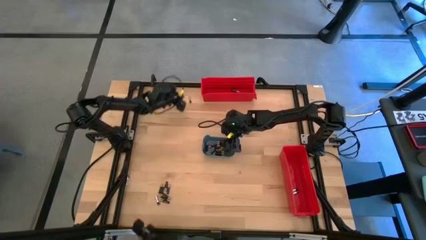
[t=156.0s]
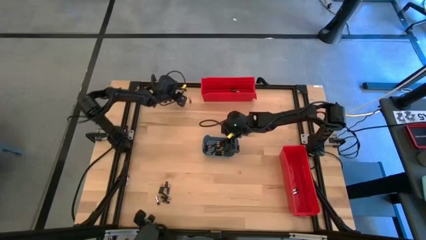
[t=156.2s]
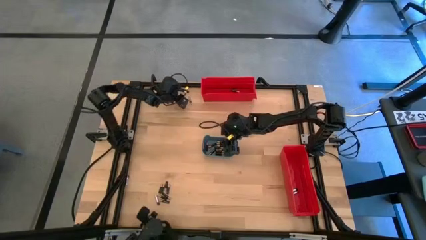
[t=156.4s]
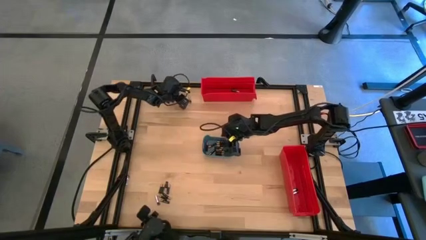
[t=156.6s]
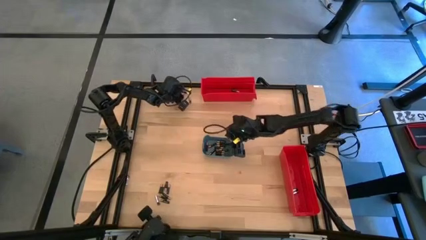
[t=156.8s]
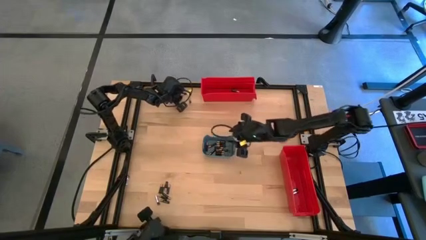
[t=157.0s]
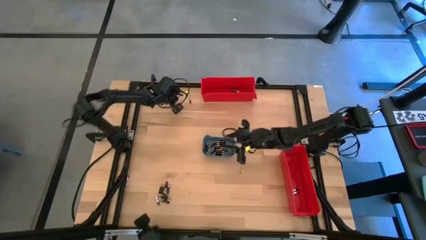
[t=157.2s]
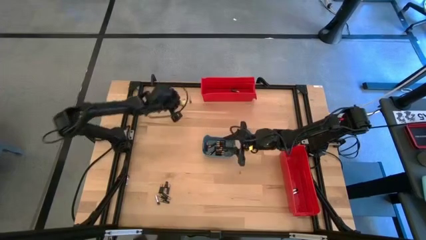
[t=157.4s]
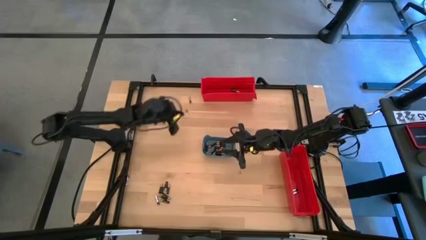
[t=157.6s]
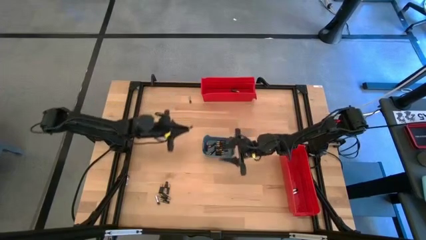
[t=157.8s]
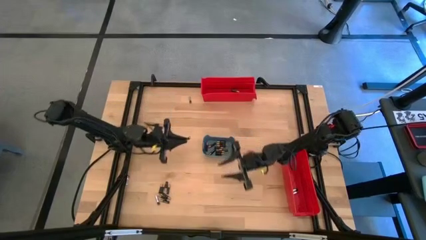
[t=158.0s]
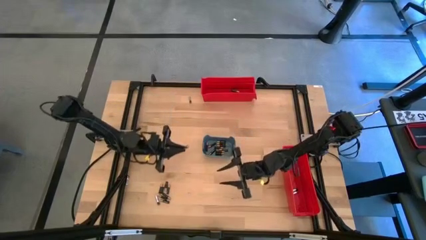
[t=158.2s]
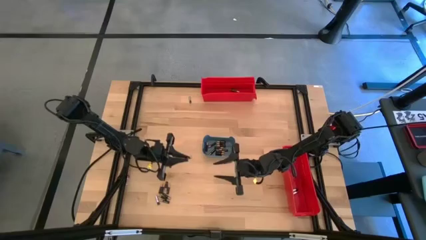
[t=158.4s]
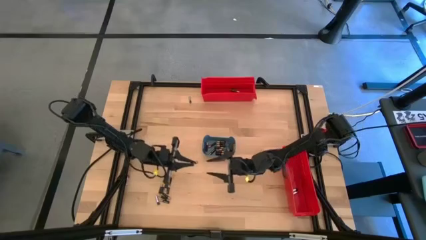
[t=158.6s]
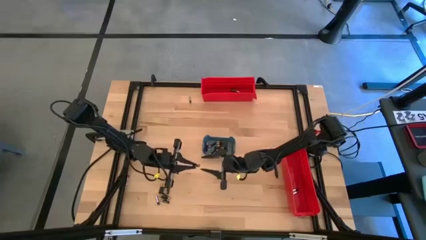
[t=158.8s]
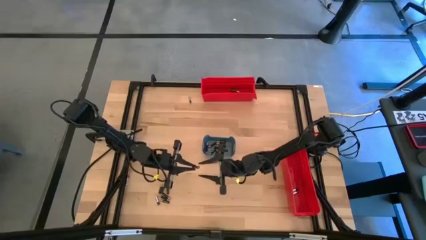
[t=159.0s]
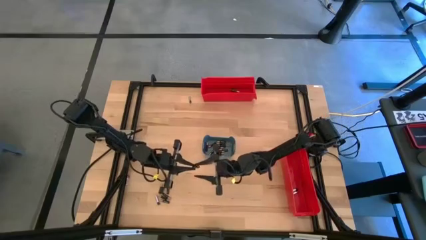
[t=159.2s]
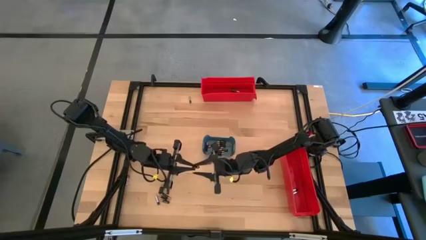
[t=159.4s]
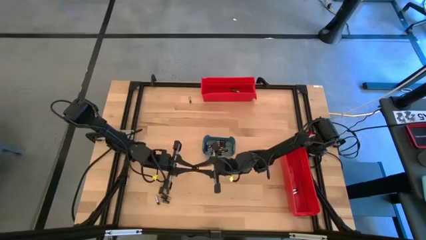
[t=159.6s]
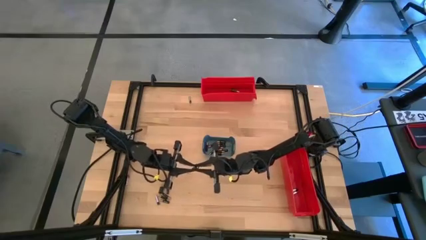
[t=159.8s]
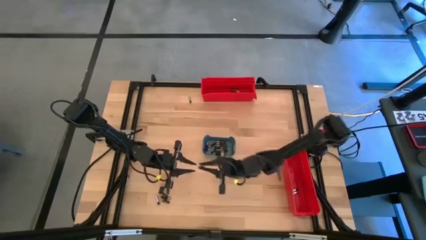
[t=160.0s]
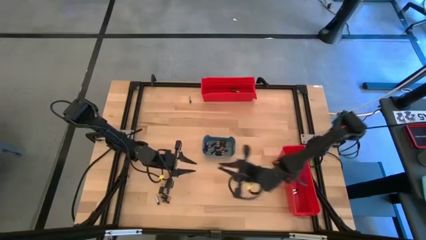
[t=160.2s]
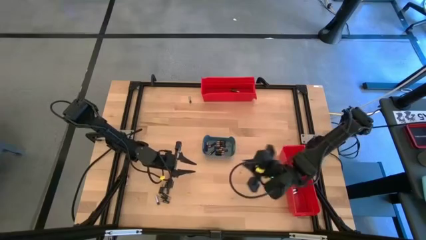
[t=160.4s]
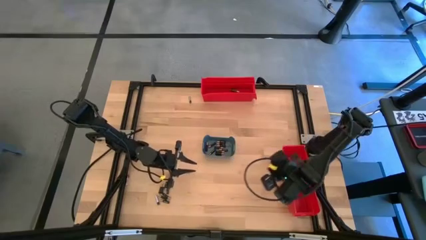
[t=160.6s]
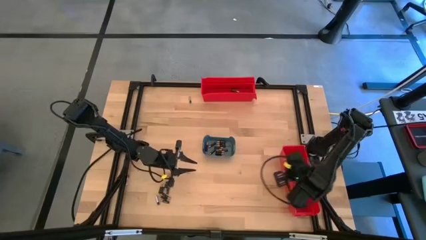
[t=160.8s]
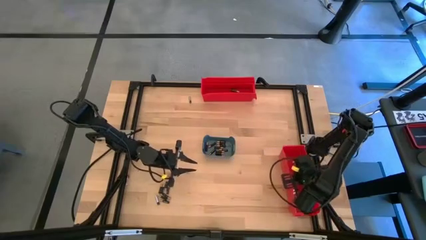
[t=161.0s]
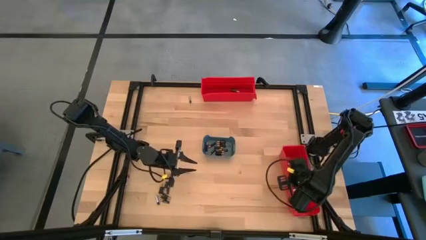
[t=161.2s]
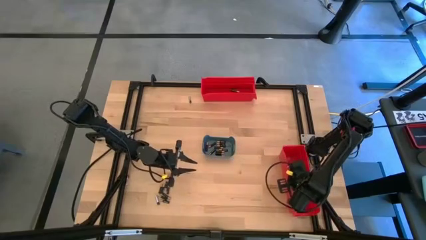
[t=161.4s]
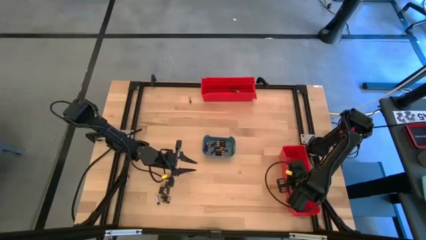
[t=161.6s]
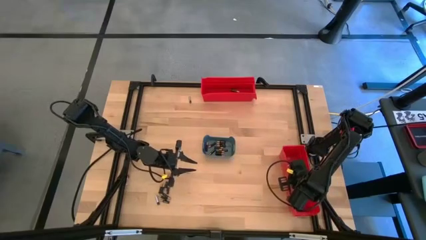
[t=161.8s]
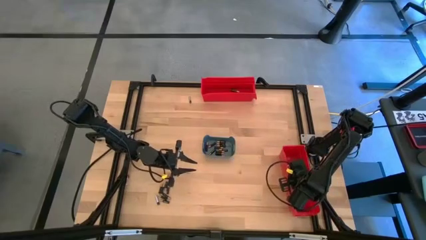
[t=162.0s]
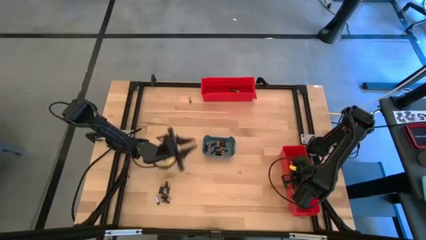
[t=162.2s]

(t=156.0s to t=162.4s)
Task: Sort batteries
Put the silver battery into the bottom red bin

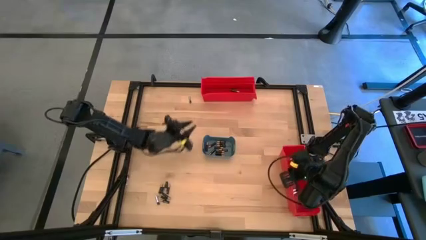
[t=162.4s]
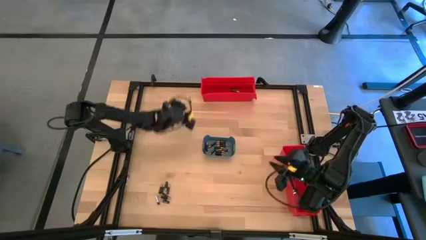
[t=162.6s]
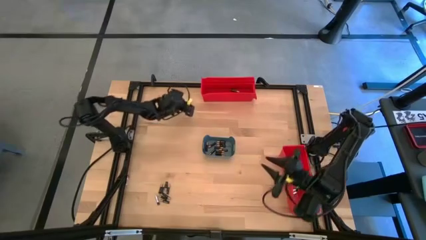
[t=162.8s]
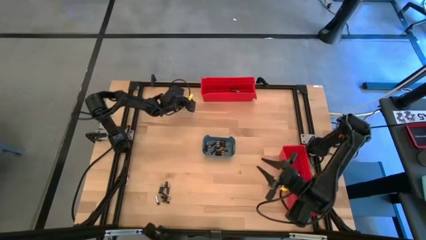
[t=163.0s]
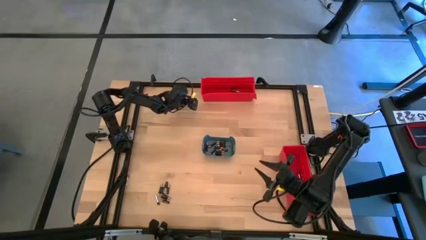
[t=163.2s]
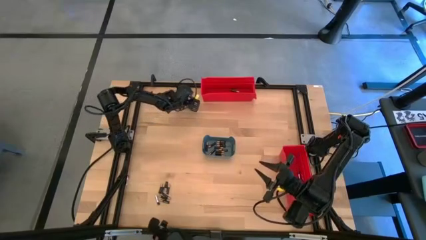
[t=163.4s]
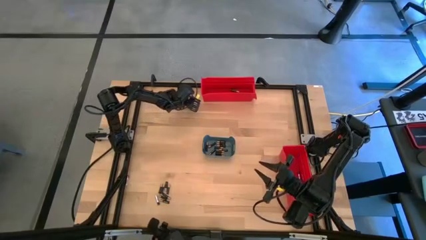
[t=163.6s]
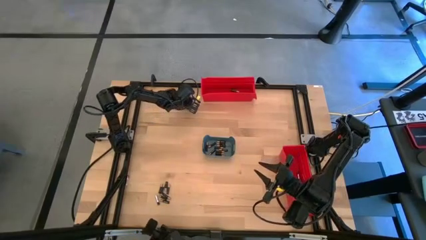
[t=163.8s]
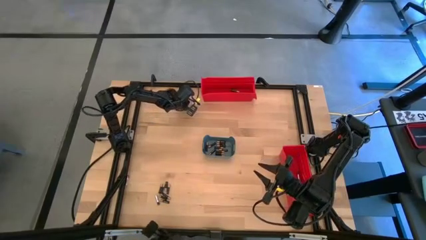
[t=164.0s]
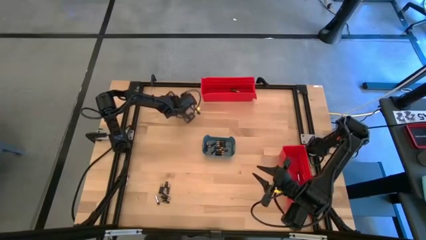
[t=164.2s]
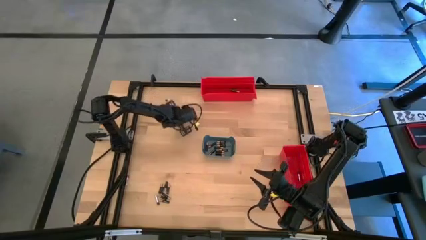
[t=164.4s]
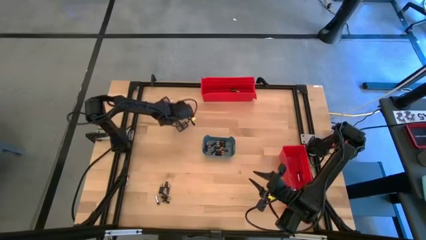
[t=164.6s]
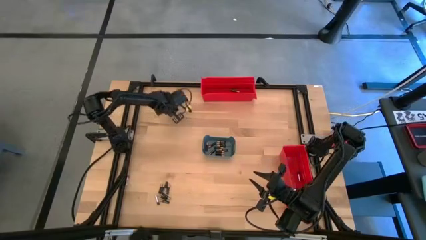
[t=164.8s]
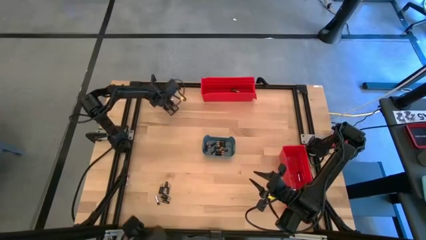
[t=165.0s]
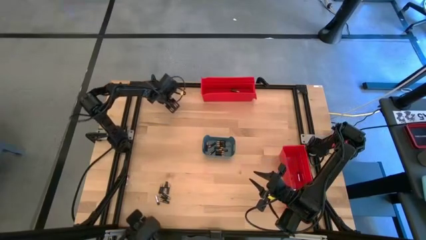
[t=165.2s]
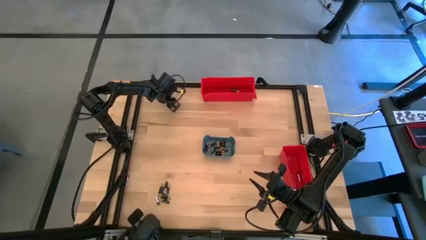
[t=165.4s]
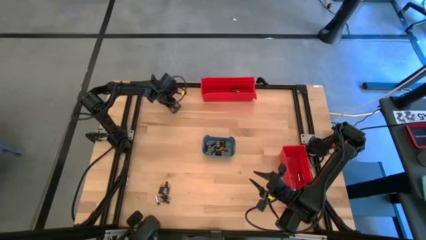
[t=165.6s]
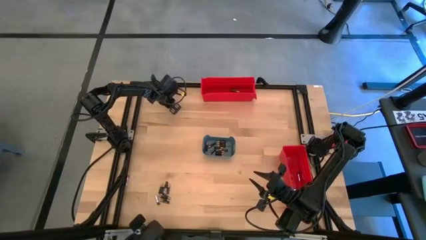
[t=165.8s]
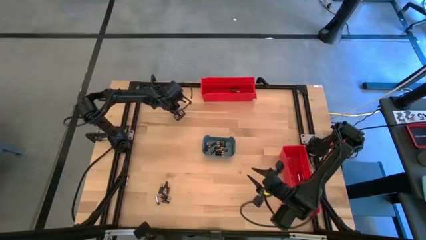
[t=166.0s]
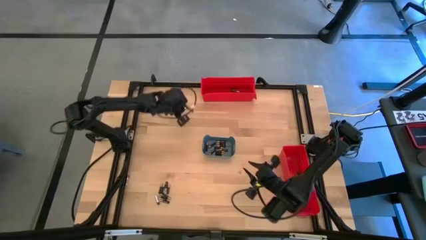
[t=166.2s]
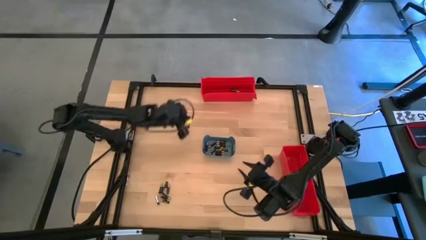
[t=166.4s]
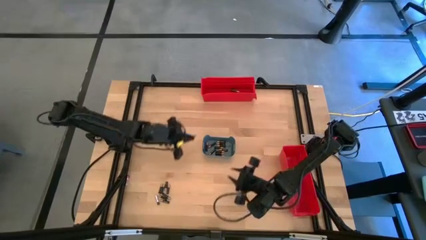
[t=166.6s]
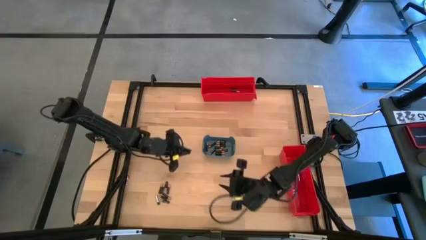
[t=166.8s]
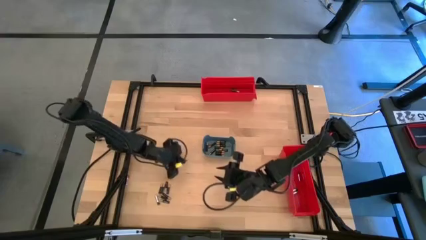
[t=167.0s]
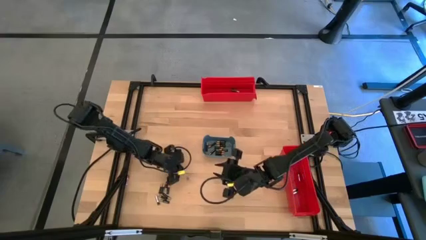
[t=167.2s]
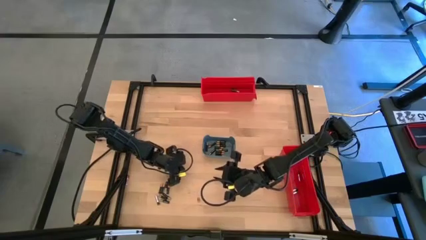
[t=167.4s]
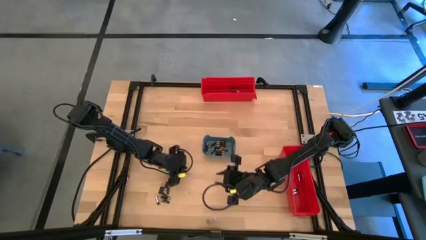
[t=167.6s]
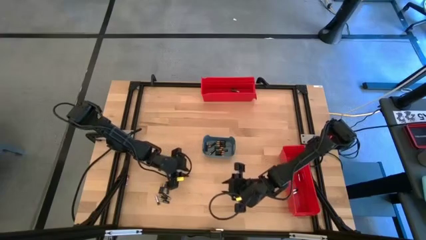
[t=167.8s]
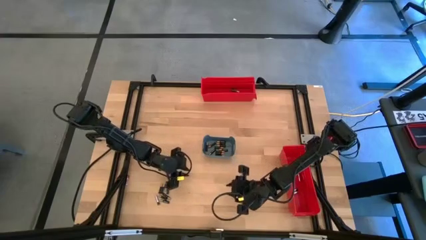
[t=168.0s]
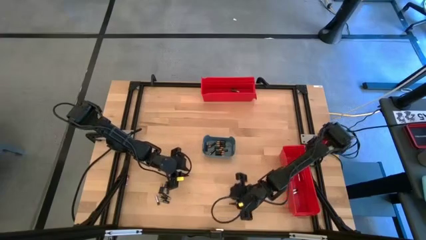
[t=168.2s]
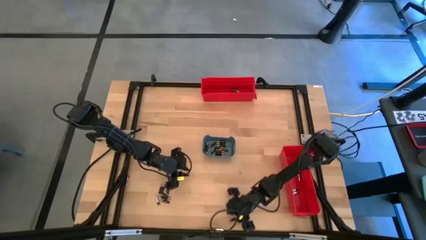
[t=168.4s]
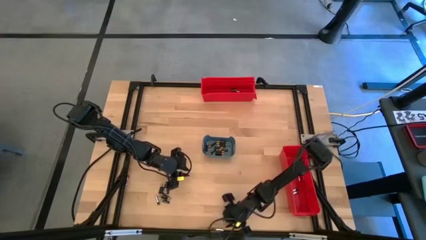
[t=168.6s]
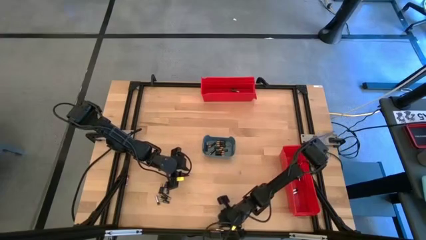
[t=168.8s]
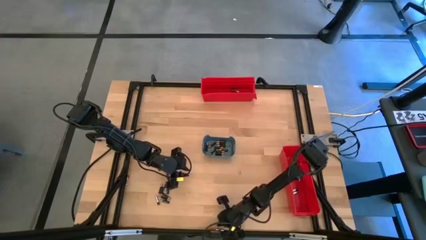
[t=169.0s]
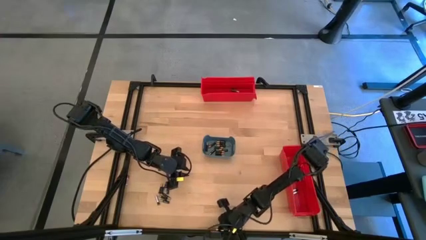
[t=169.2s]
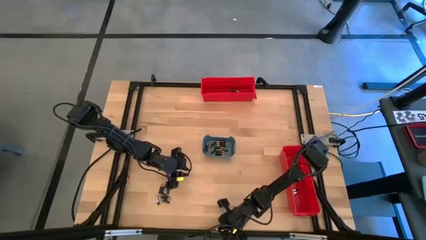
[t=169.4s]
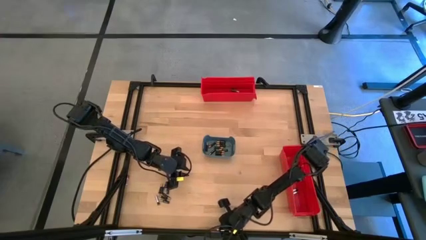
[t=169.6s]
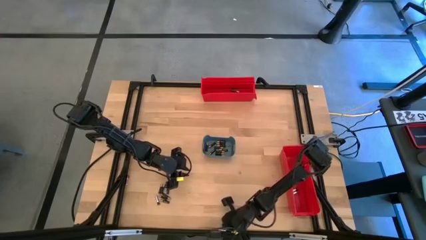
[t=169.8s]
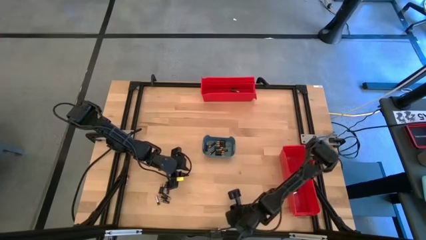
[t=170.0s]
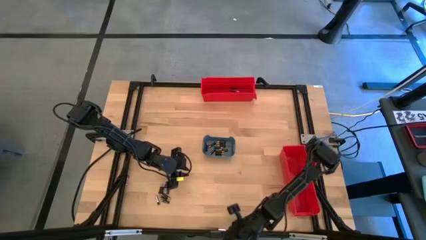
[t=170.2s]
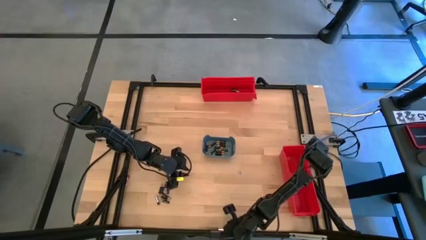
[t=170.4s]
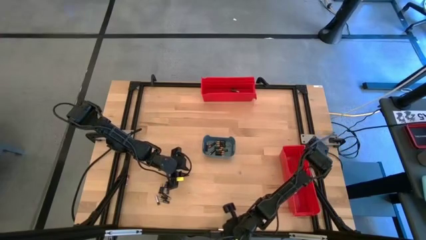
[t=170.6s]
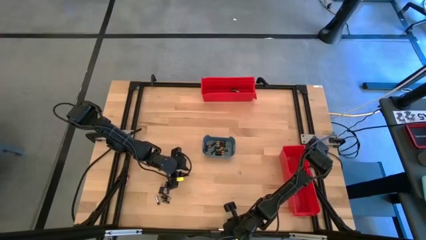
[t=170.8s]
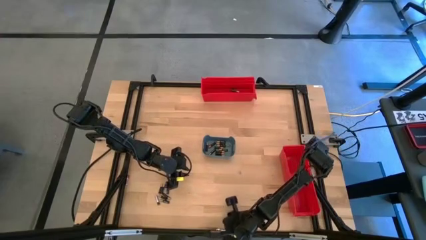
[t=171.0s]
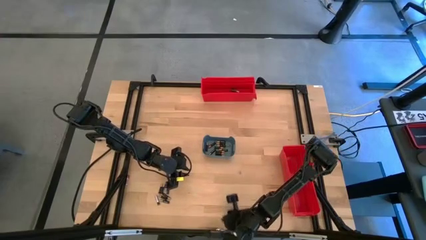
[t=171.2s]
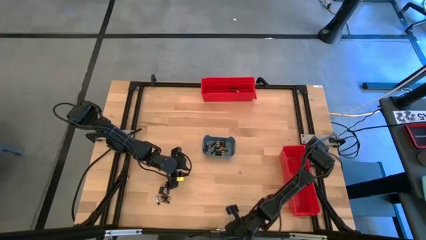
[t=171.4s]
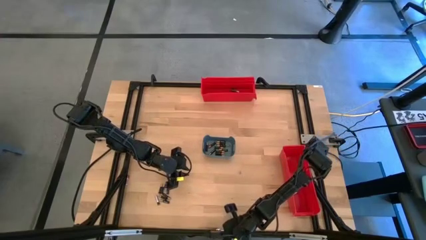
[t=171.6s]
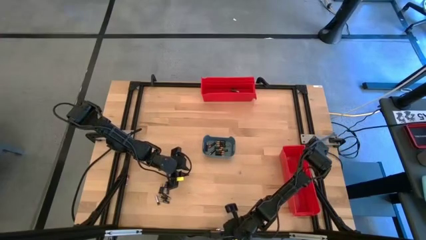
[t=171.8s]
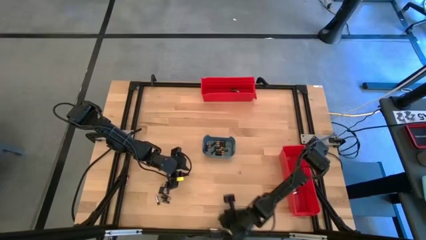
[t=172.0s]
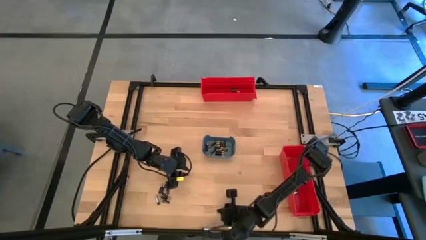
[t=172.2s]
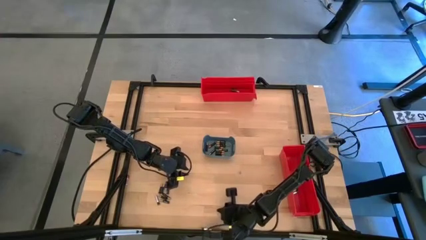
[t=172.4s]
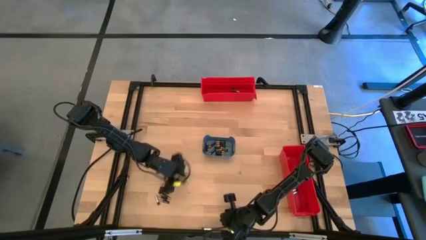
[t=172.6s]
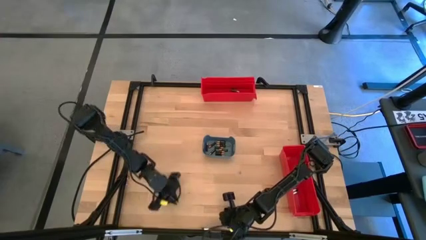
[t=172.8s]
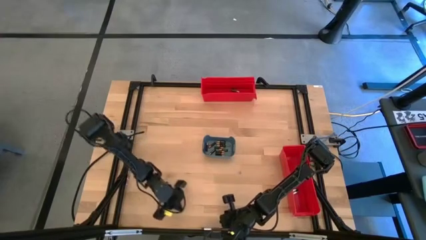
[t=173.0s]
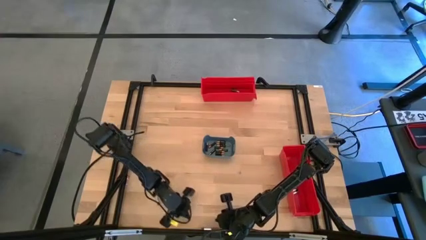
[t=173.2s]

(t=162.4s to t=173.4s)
Put the silver battery into the bottom red bin
